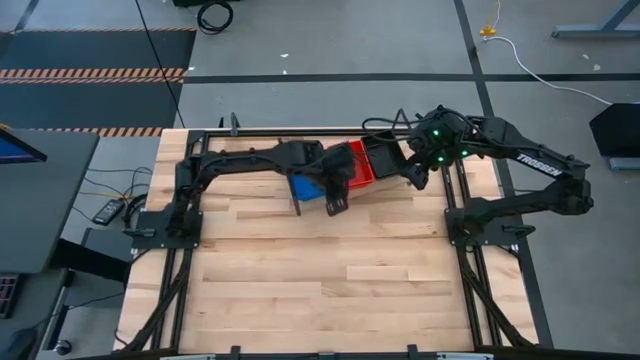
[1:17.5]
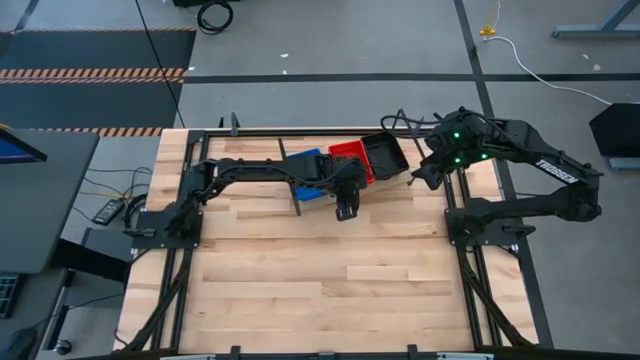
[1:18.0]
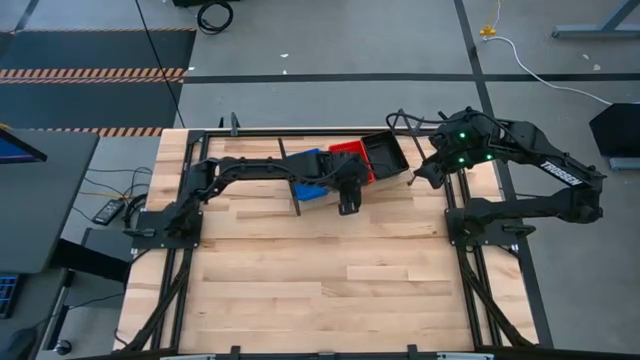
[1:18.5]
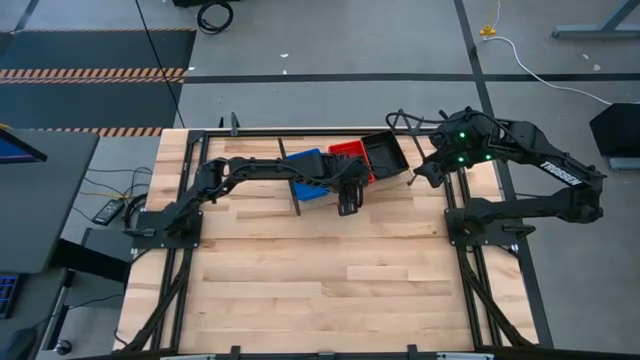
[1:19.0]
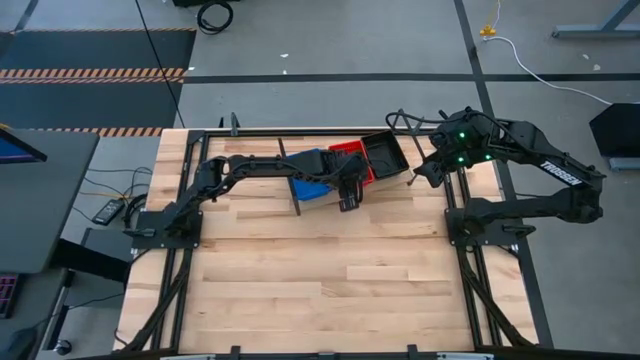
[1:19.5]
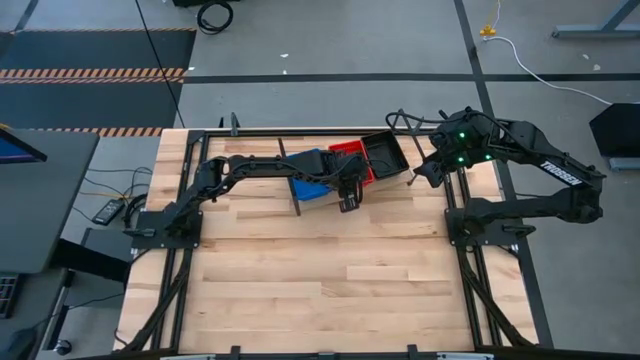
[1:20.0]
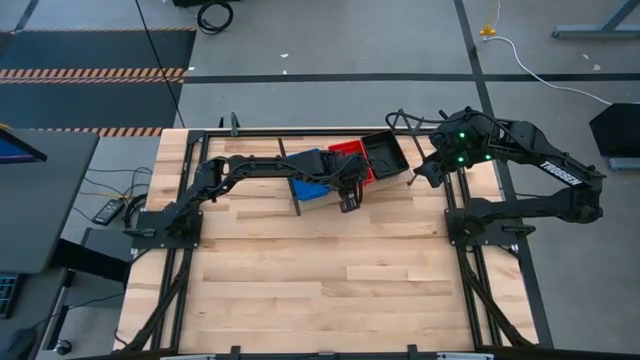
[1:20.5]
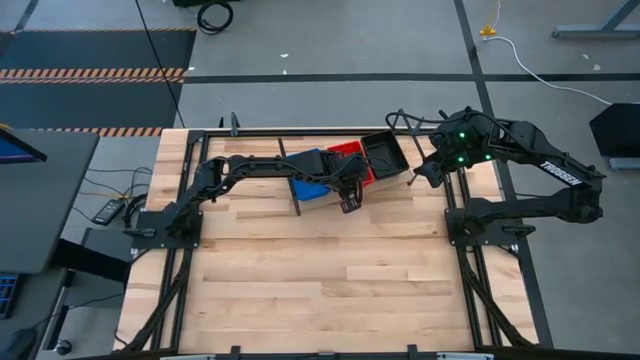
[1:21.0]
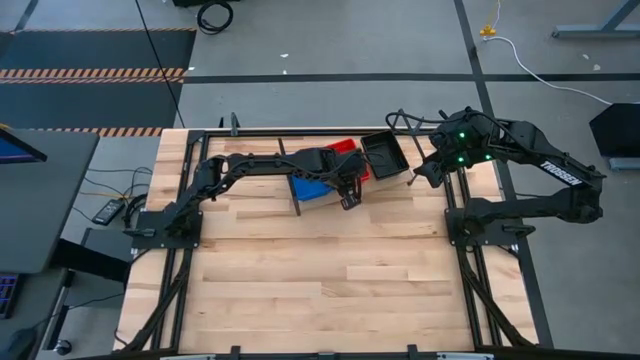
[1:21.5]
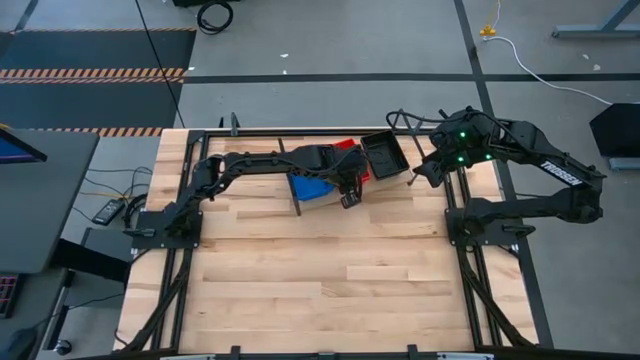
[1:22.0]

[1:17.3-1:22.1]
Task: Stack baskets on shelf by color
Adjust the stacked red bins on the shelf

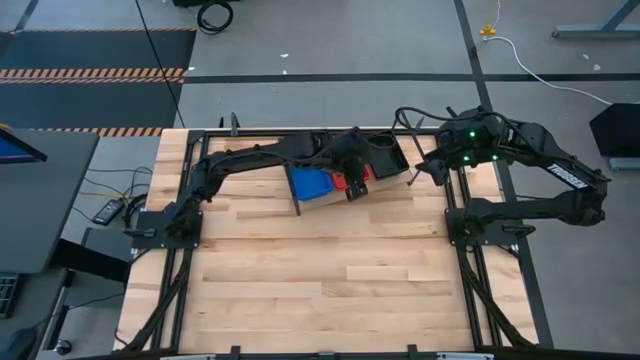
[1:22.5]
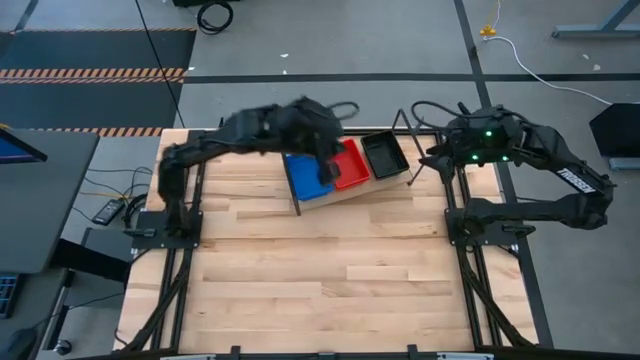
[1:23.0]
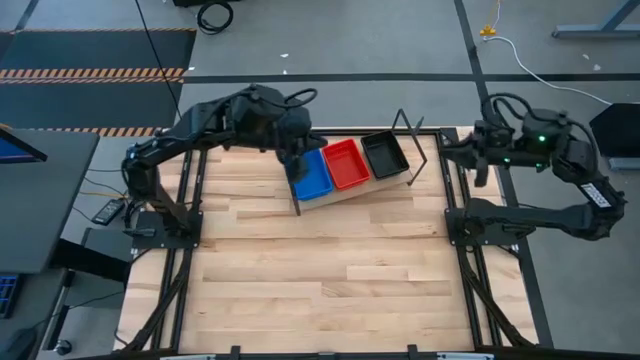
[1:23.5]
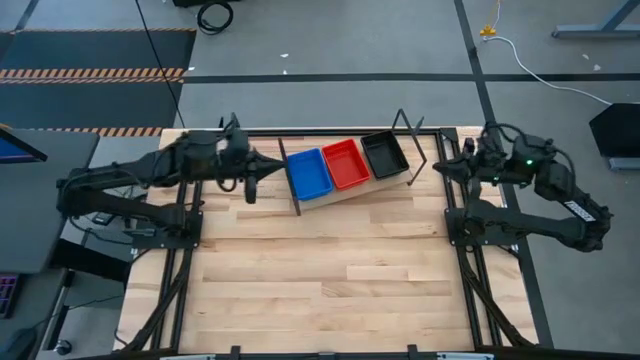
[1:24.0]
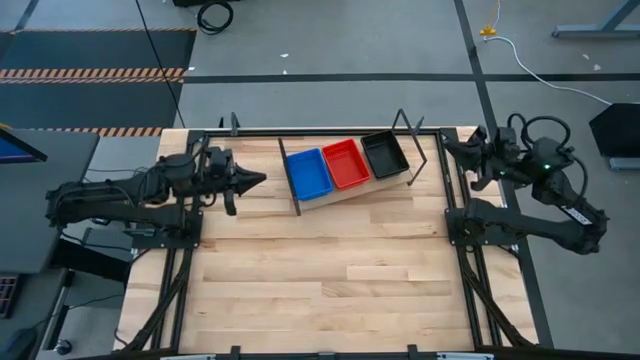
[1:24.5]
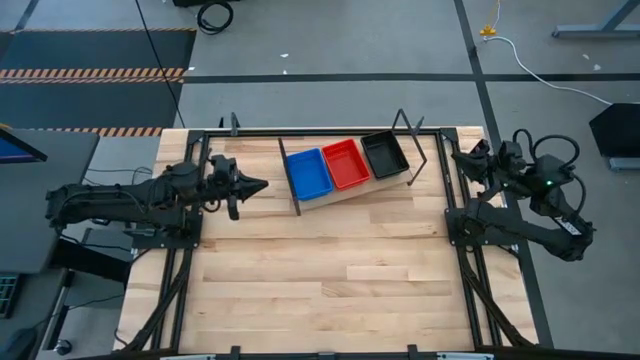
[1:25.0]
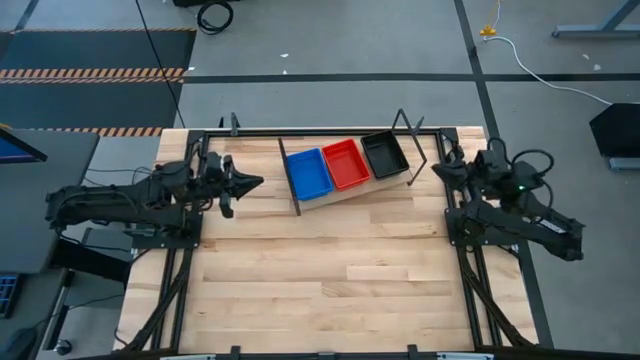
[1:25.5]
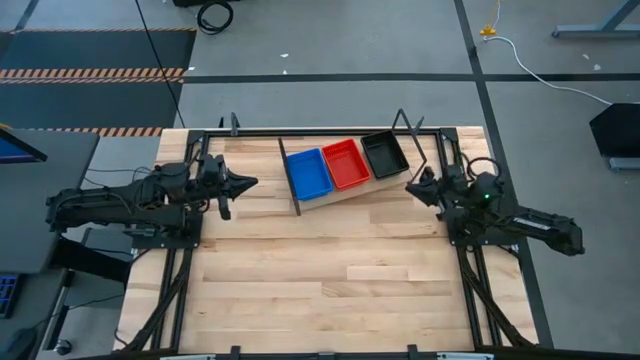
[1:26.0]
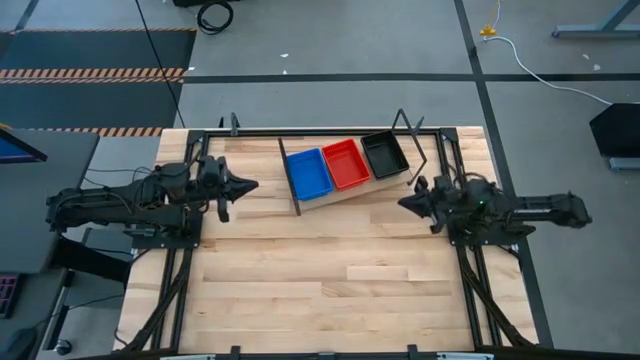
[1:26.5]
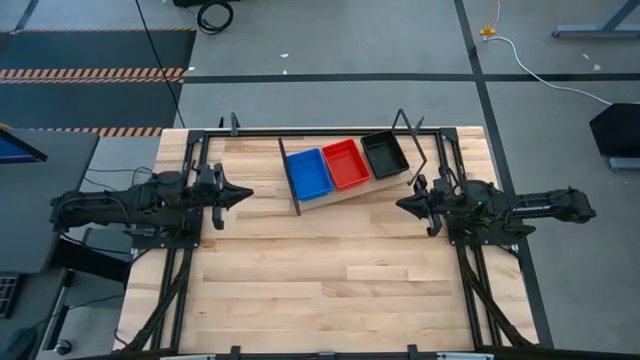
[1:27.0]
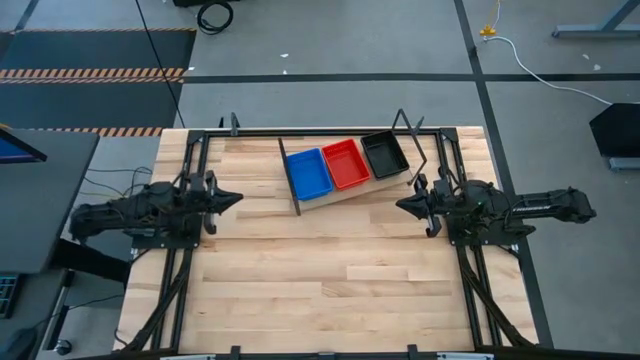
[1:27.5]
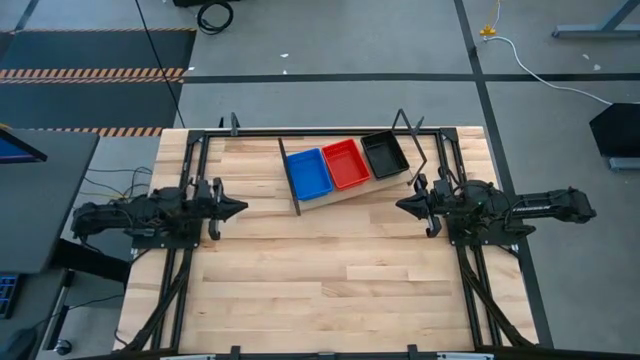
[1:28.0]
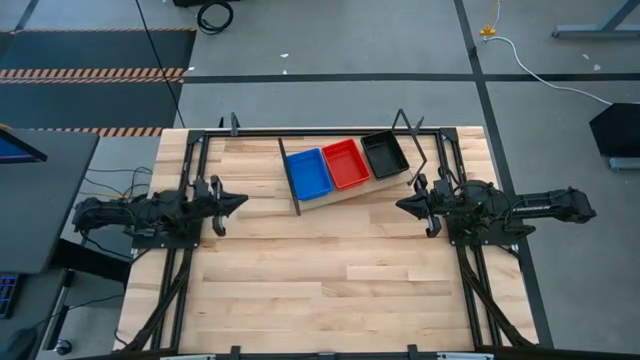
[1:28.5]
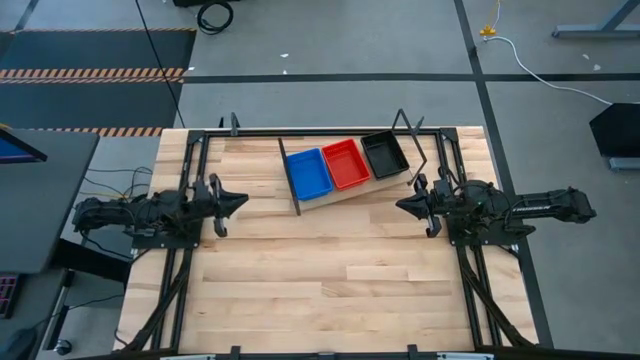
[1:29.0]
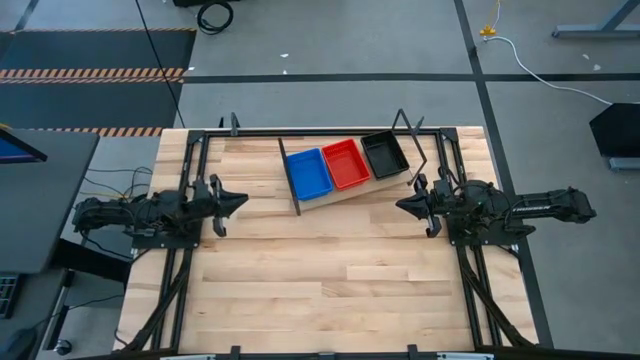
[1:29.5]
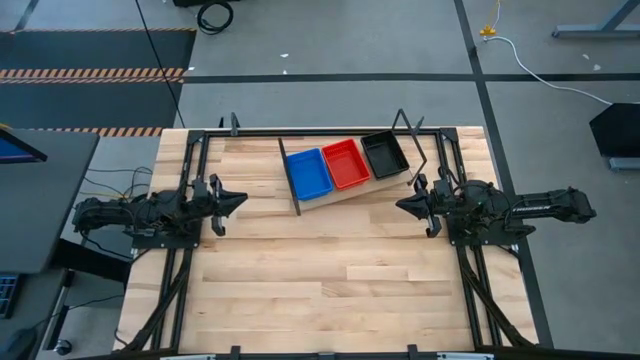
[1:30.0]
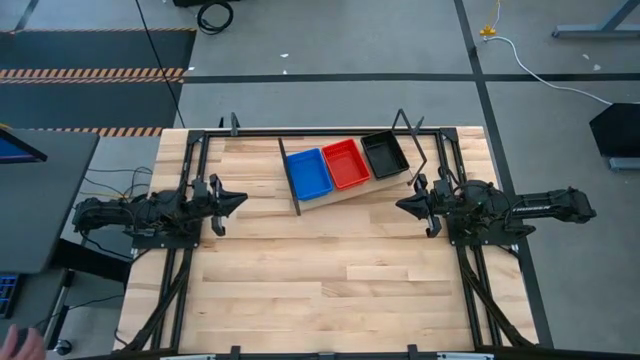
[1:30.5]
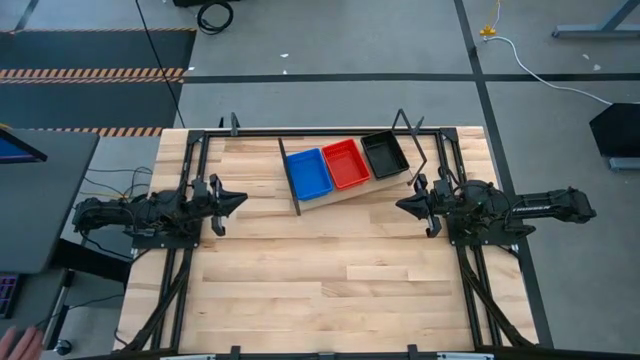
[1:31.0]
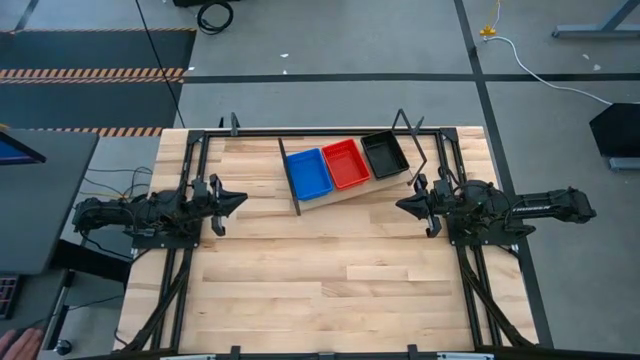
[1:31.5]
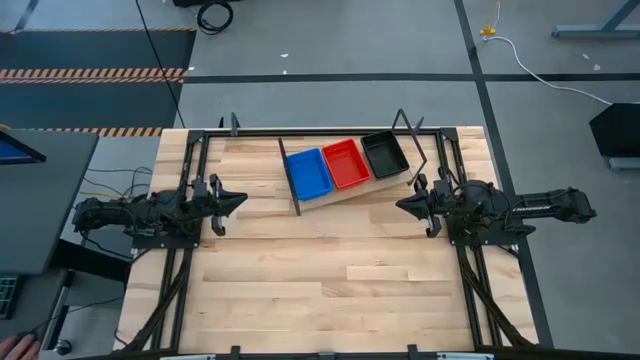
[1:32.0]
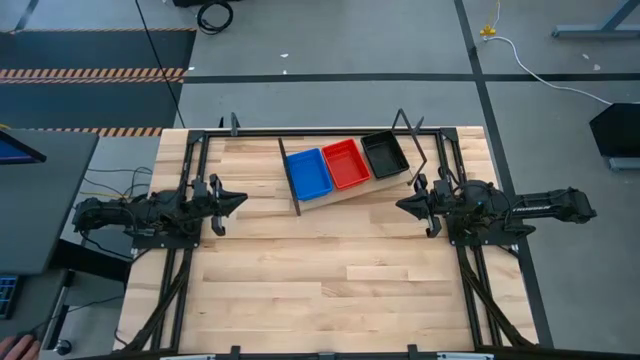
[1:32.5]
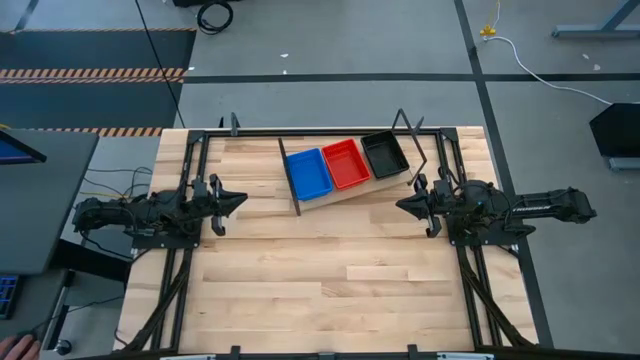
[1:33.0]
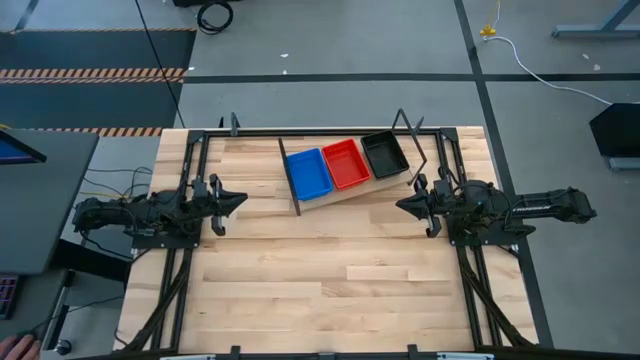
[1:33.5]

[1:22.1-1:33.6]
Return to home position

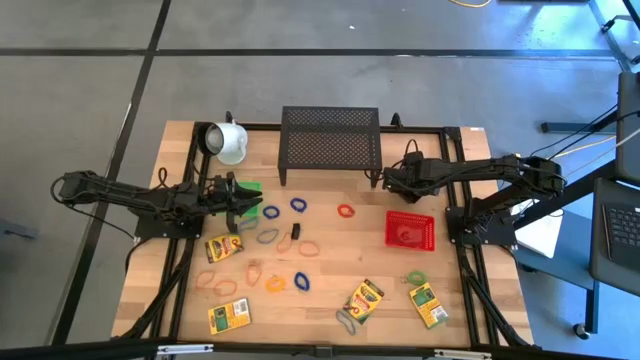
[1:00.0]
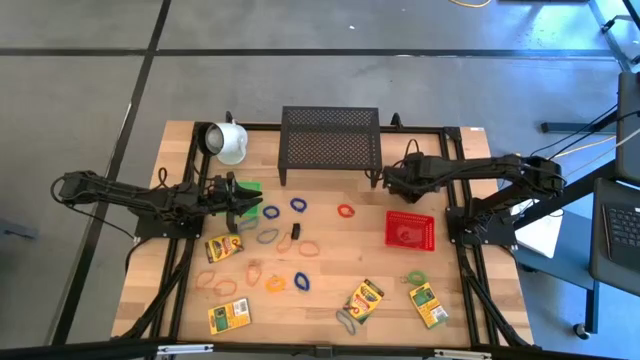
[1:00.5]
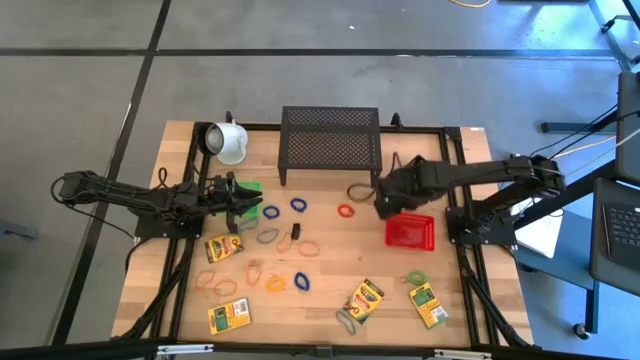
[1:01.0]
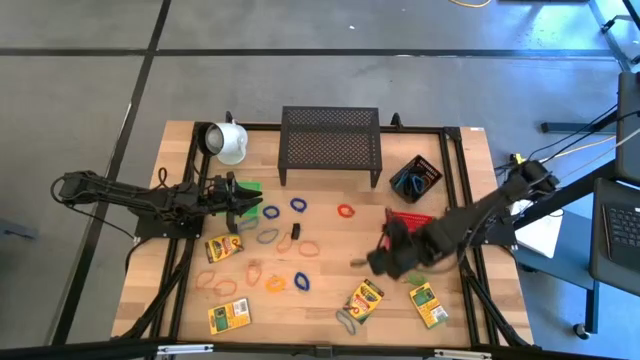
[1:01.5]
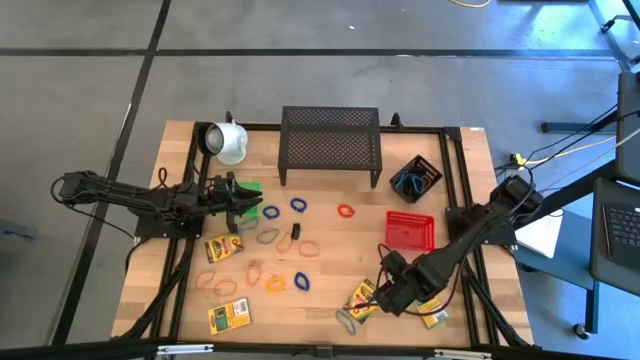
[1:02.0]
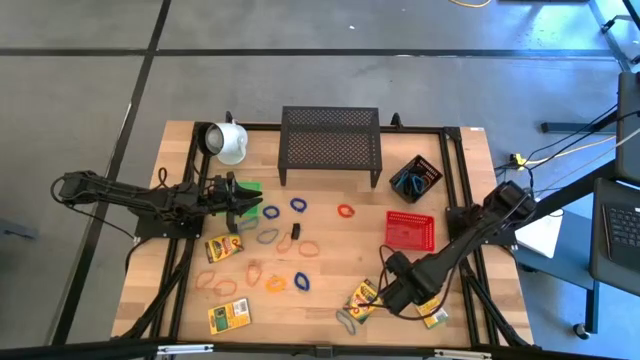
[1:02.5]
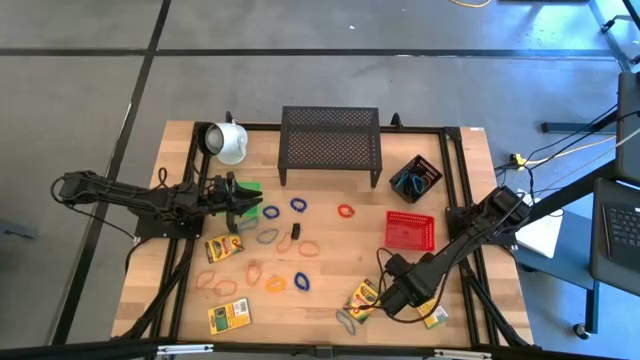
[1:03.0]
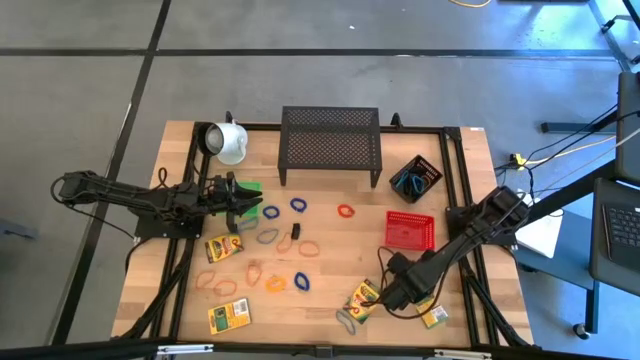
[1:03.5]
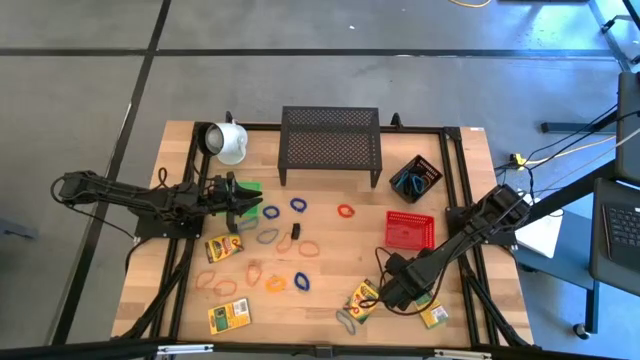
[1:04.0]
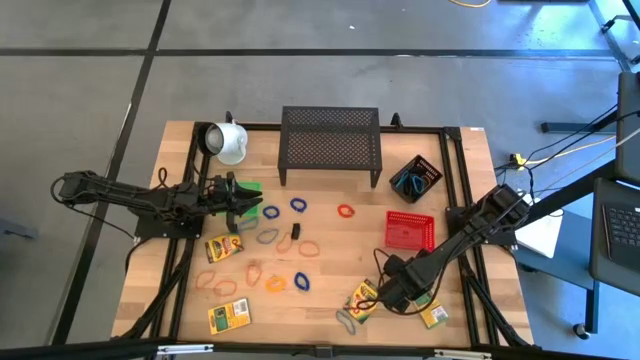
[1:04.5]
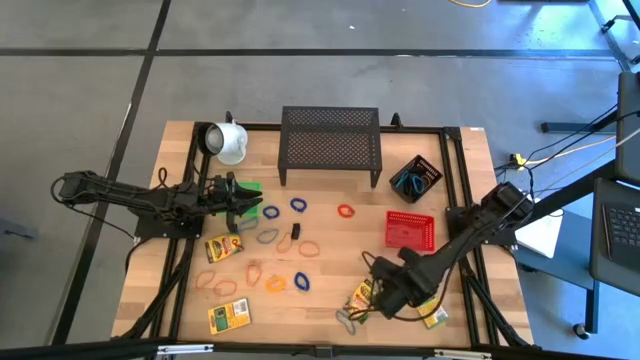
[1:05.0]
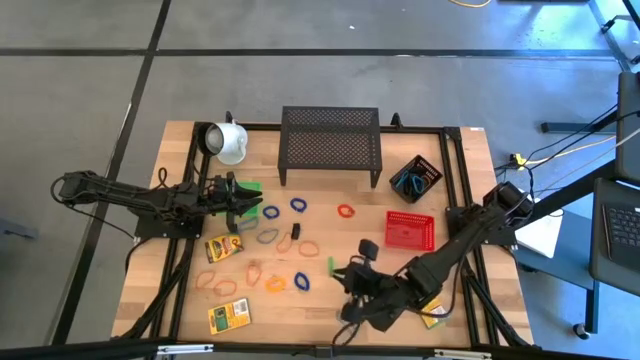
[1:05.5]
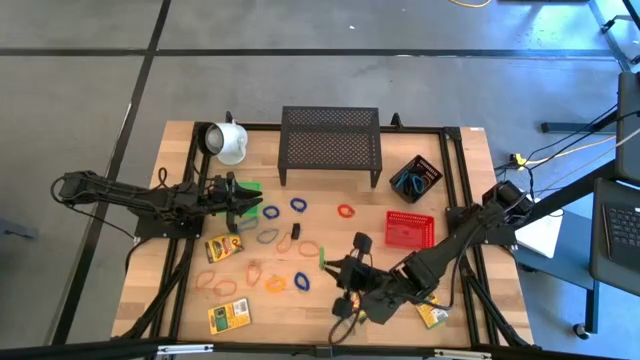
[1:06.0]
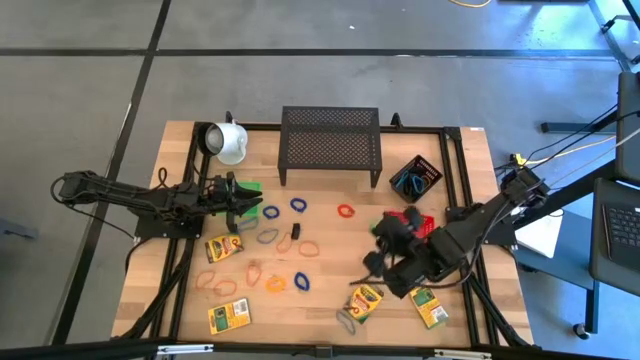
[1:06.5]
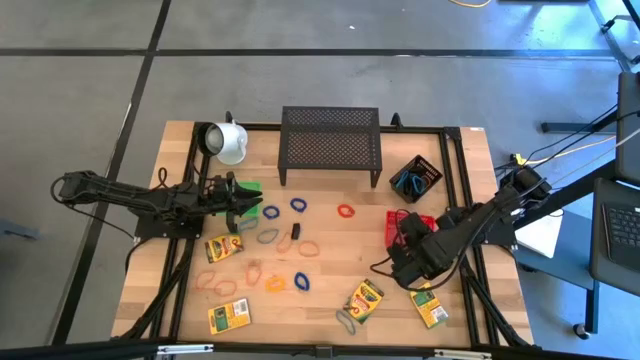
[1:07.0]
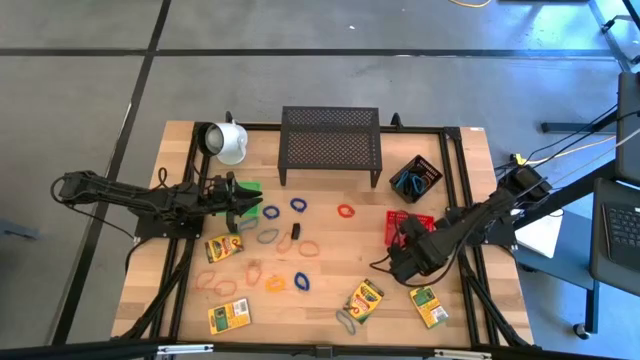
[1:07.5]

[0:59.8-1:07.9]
Task: Pick & Place Office Desk Supplies
Put the green spring keychain into the orange bin
